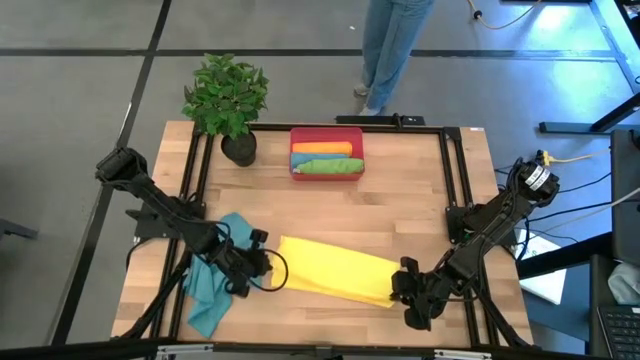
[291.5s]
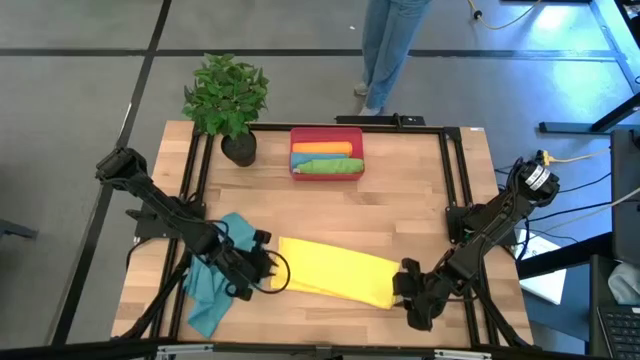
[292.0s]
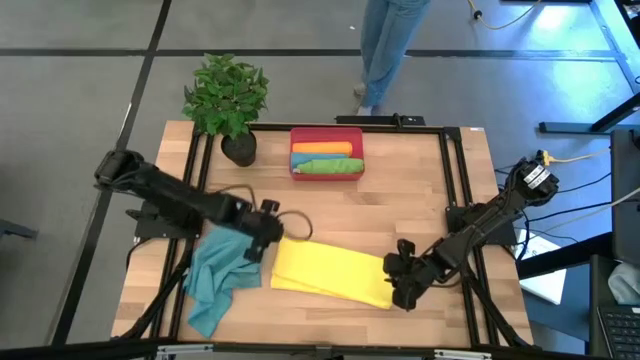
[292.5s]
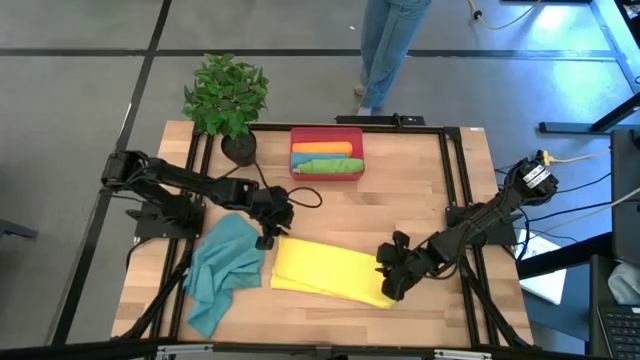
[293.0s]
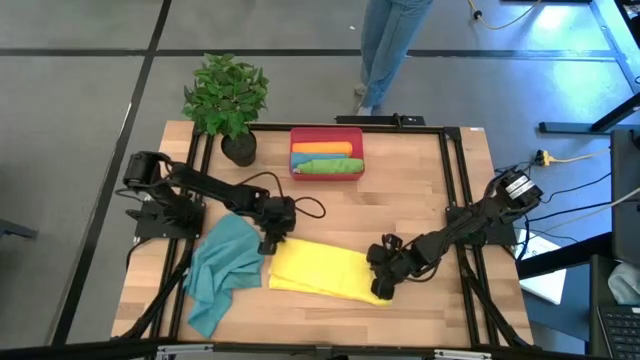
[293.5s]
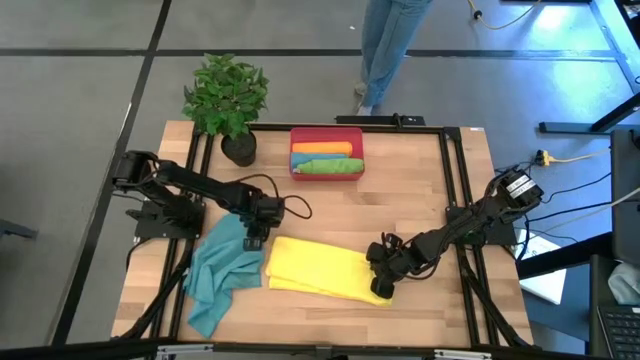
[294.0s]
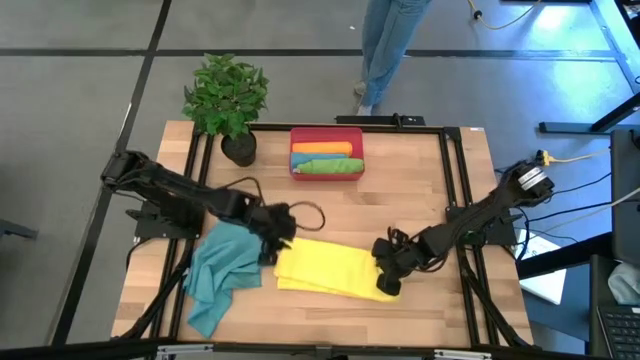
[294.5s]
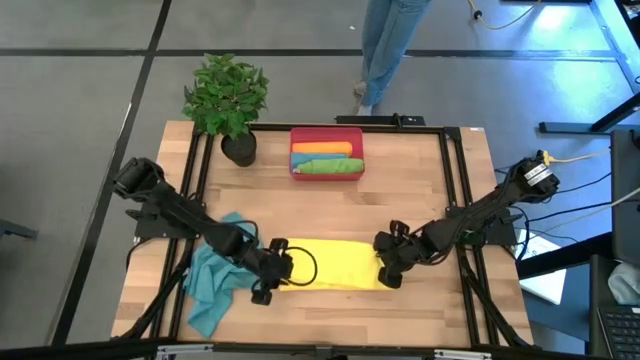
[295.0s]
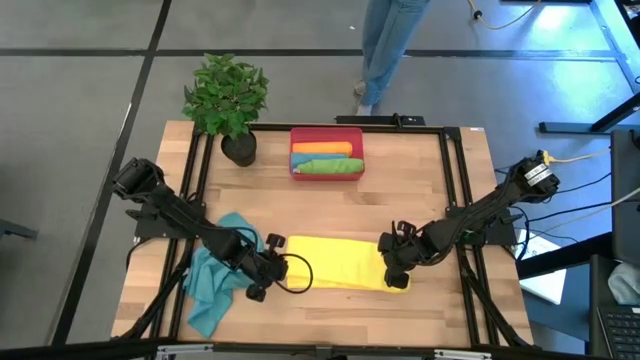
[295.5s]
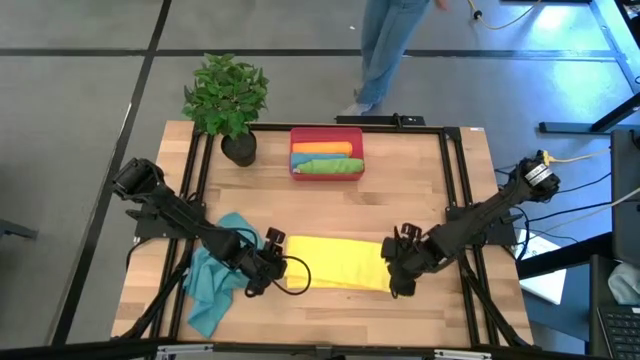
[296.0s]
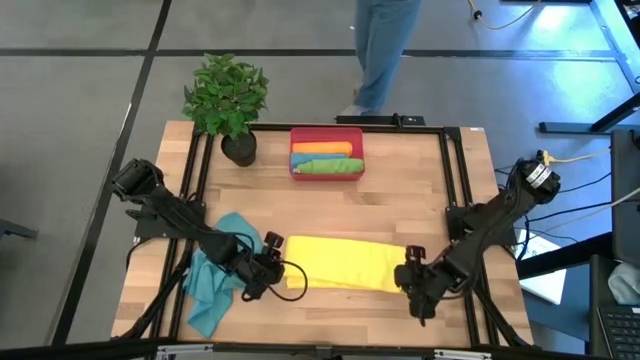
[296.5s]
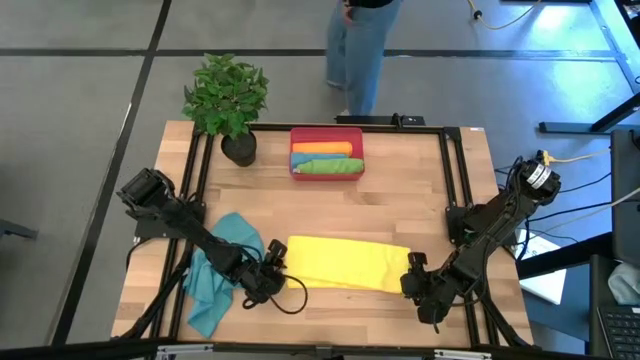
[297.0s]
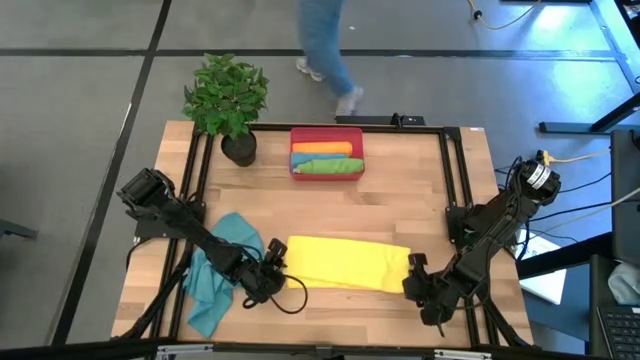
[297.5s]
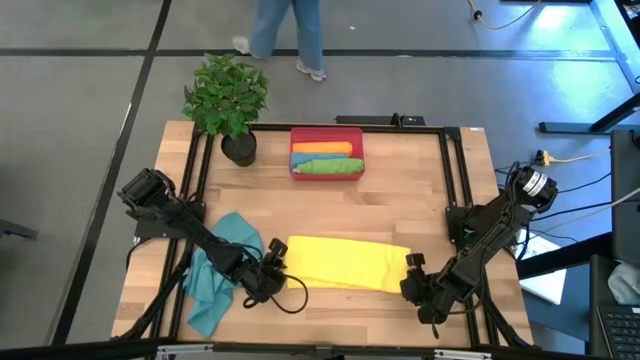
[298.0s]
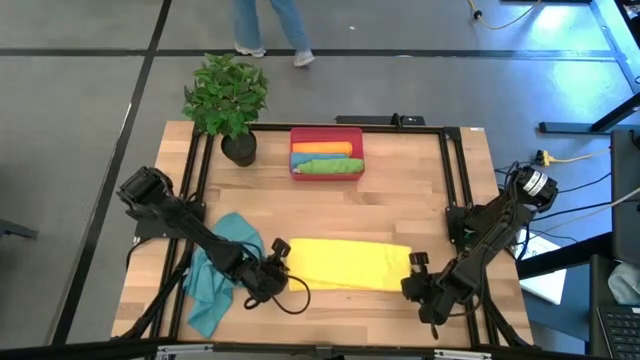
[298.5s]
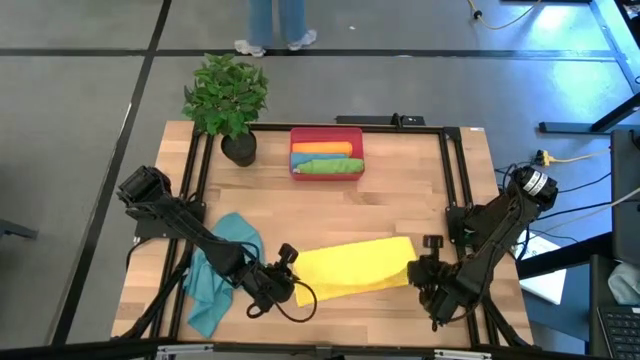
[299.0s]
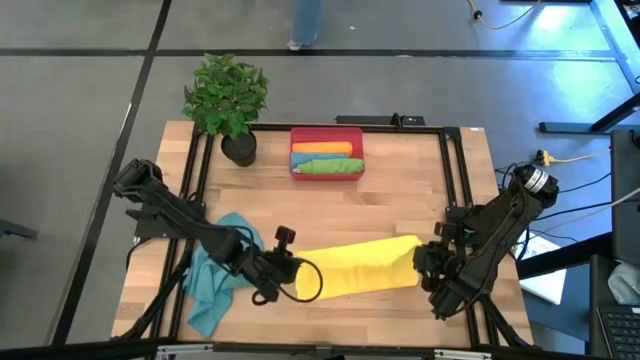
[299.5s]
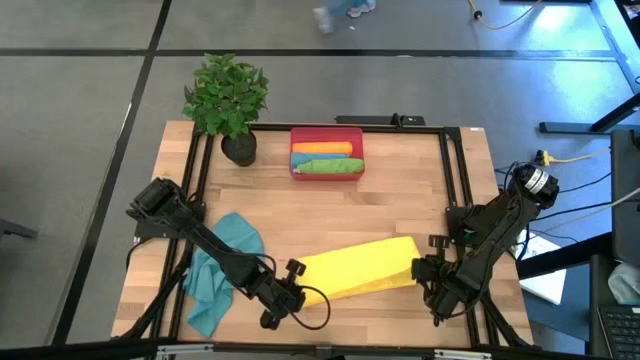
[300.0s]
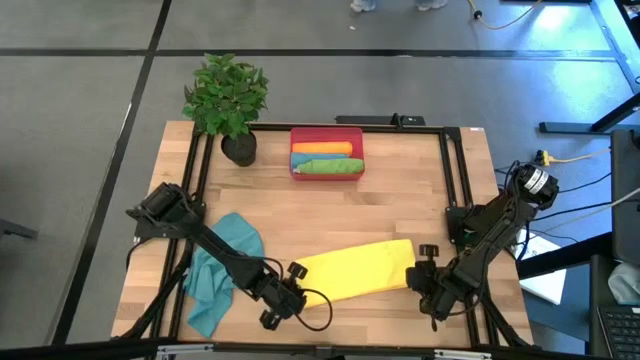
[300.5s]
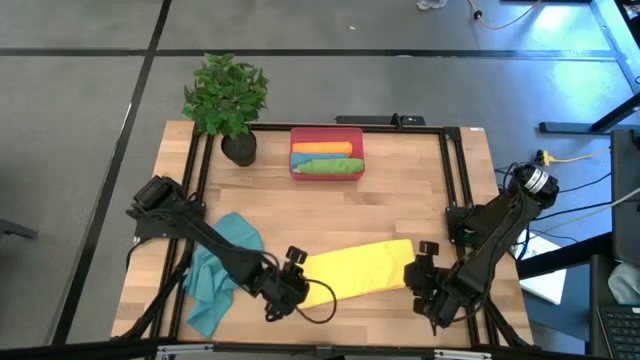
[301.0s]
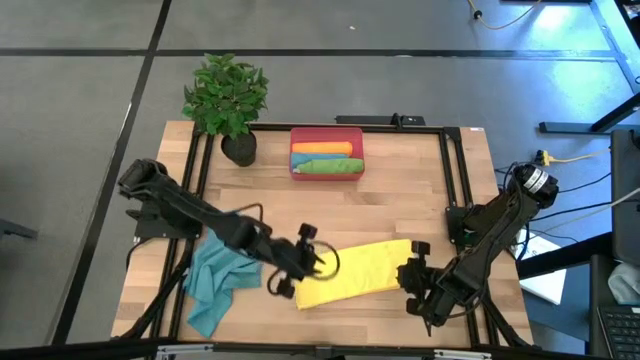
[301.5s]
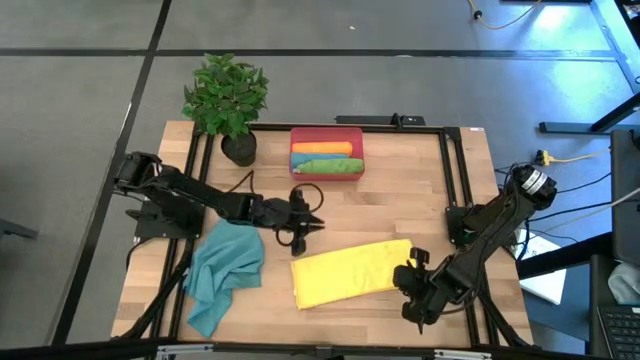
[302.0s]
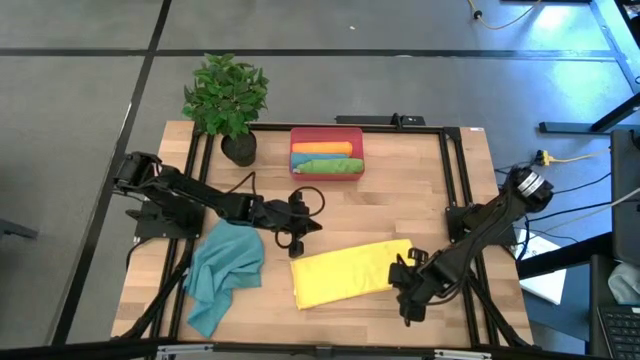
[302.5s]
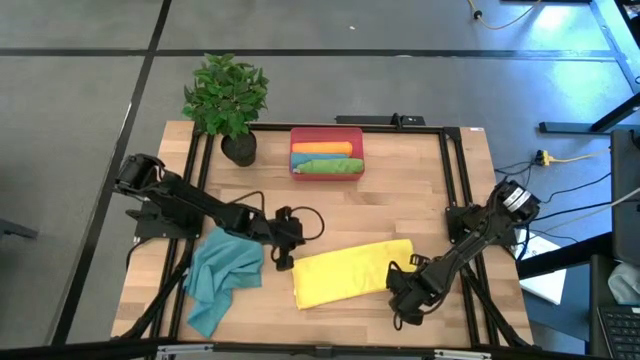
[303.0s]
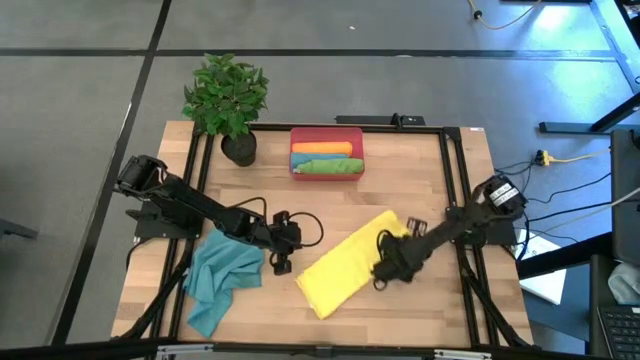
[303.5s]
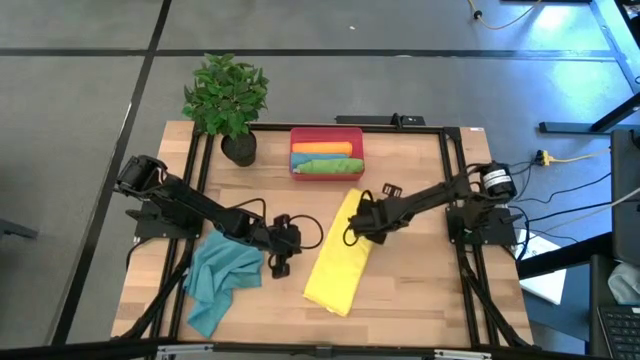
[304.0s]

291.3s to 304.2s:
Task: Roll microfiber towels into tight, uniform cylinder then place into a basket
Fold the yellow towel

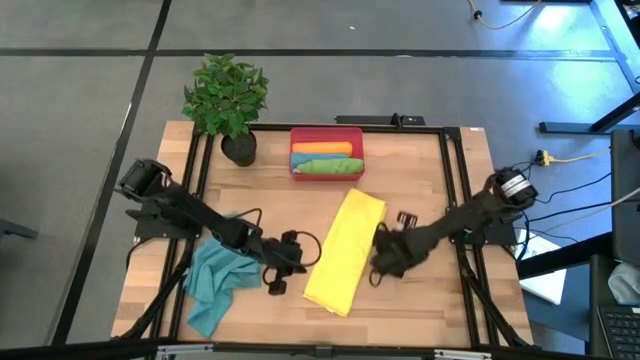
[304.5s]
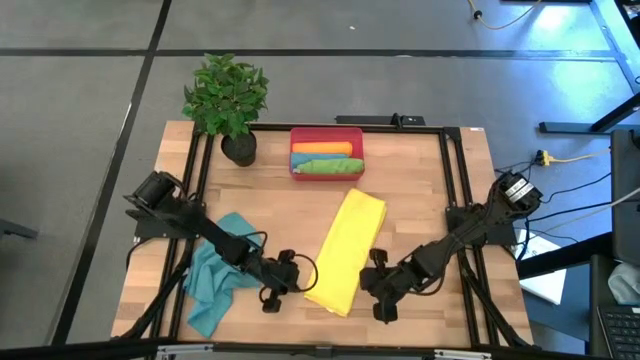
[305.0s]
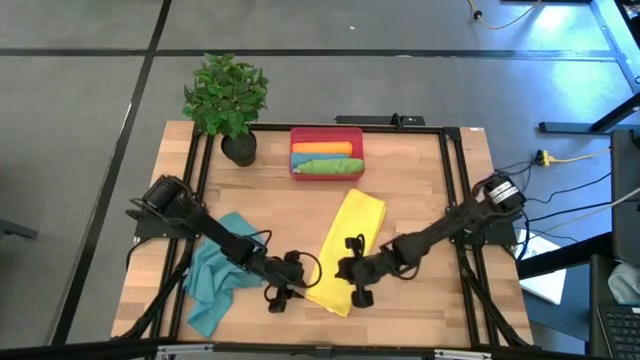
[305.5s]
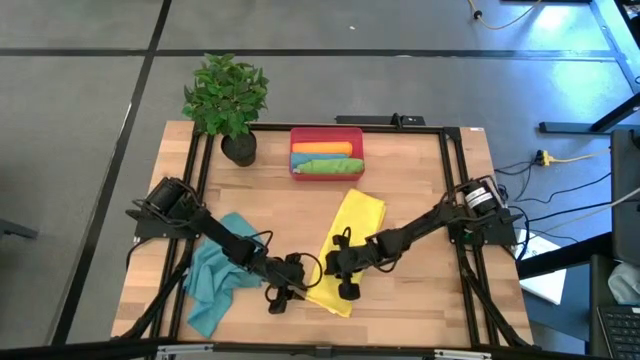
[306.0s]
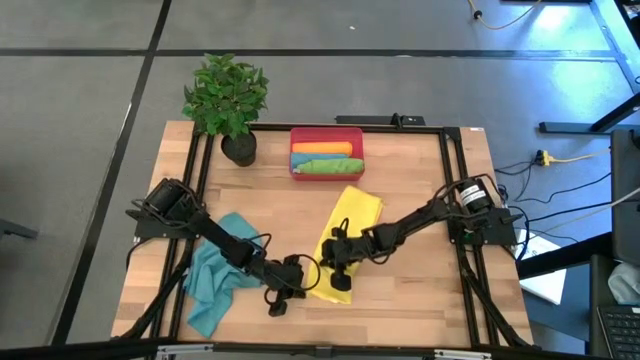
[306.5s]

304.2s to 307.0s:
Fold the yellow towel

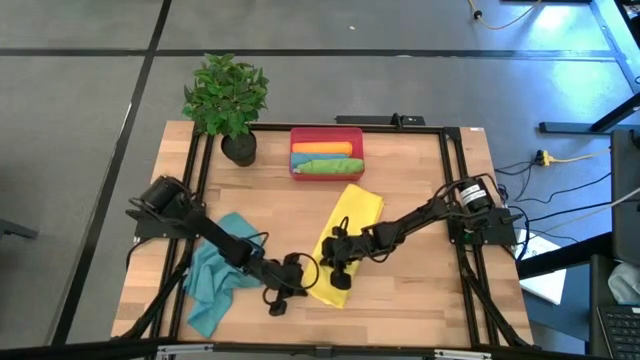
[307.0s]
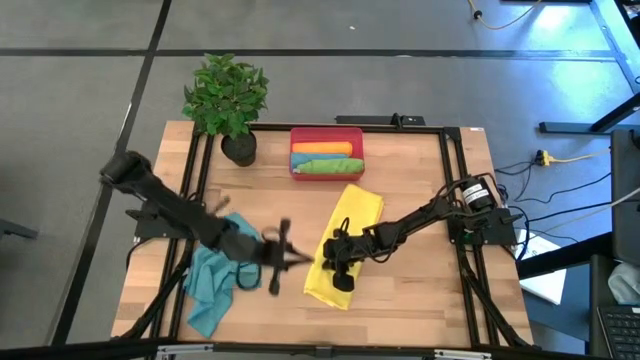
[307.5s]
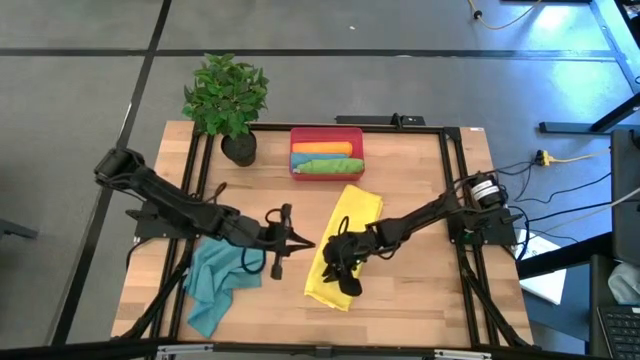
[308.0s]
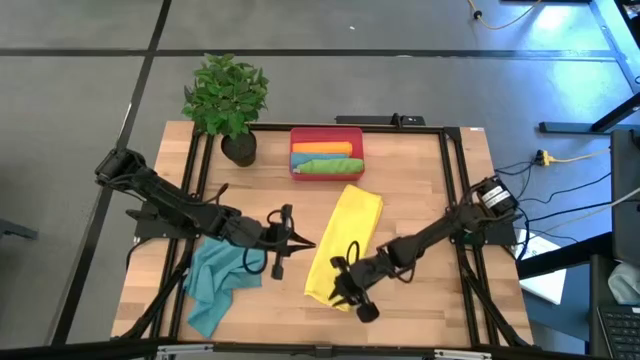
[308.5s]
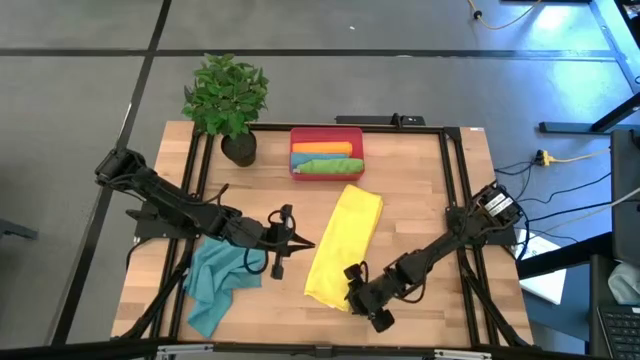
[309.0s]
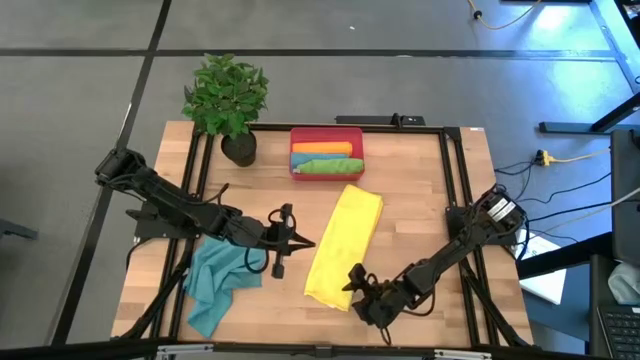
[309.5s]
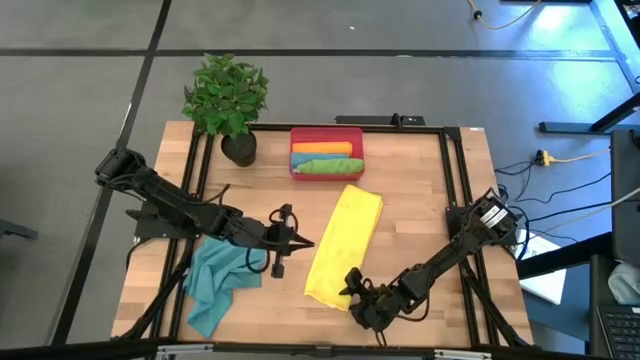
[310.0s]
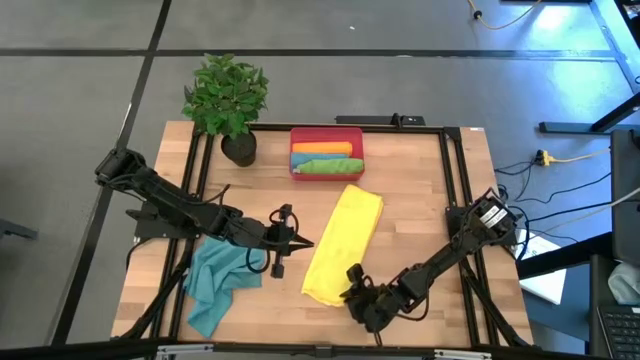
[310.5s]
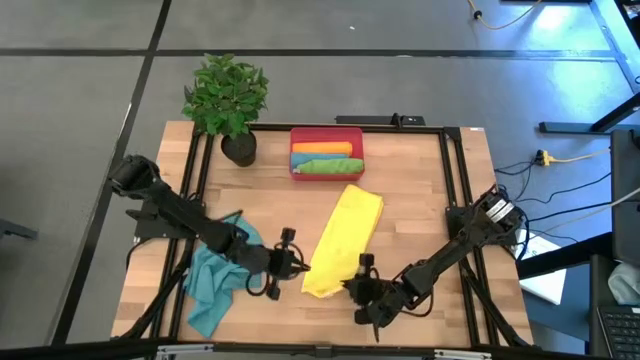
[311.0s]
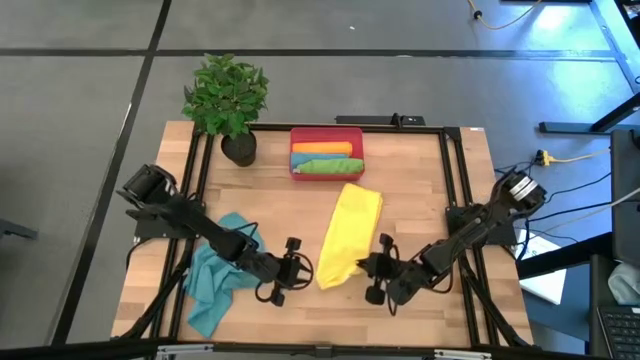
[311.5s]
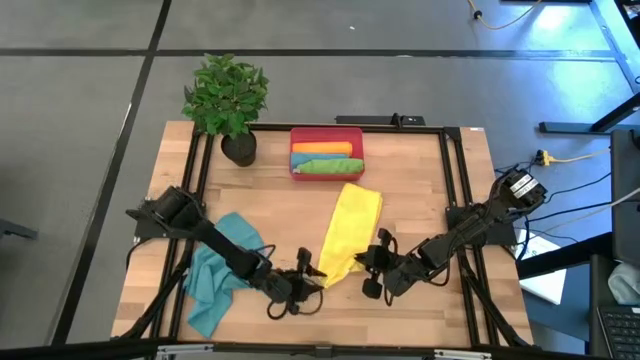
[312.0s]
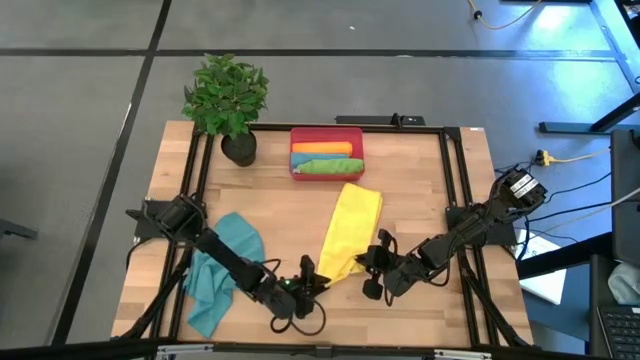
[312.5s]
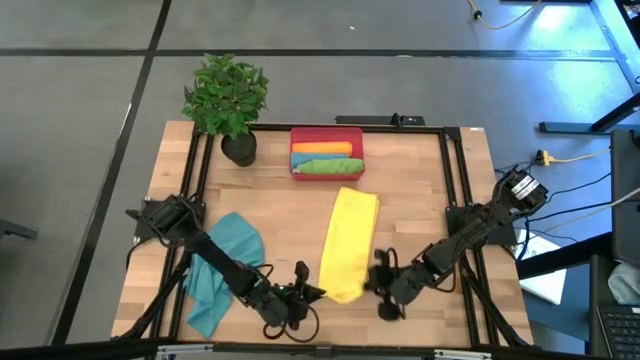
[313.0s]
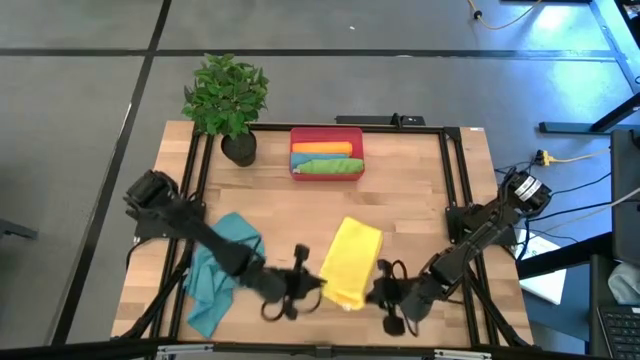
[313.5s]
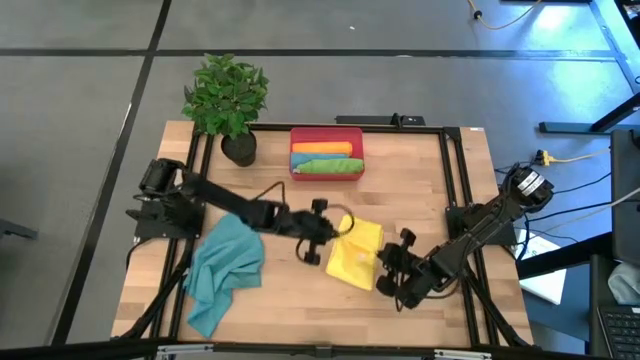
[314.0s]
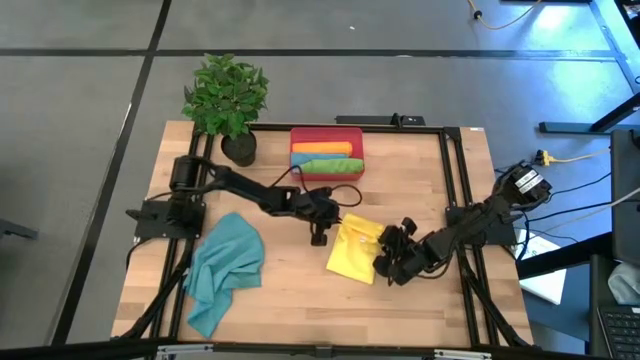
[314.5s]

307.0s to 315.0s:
Fold the yellow towel
